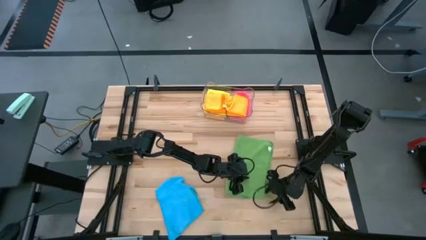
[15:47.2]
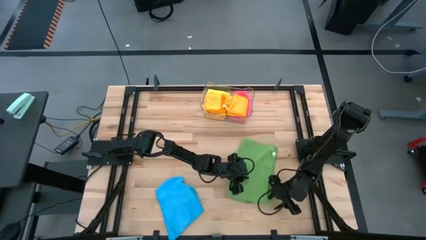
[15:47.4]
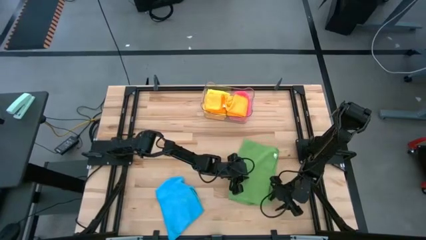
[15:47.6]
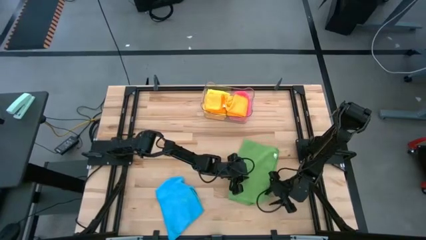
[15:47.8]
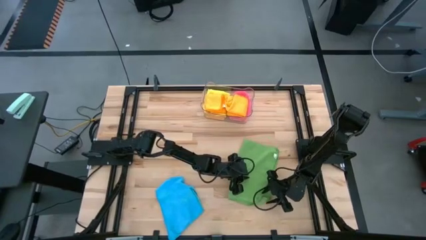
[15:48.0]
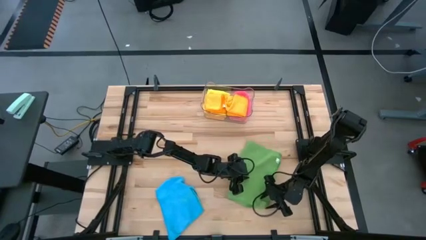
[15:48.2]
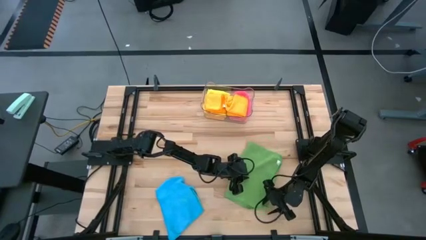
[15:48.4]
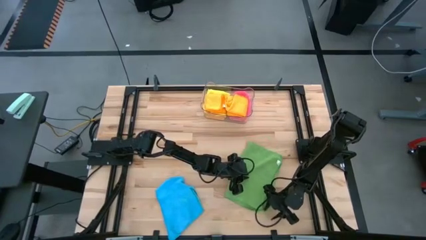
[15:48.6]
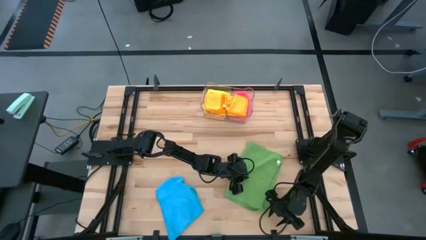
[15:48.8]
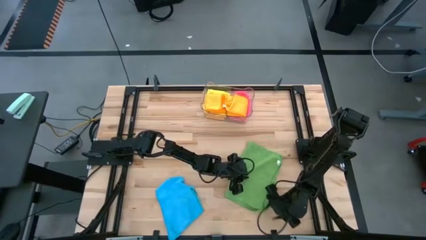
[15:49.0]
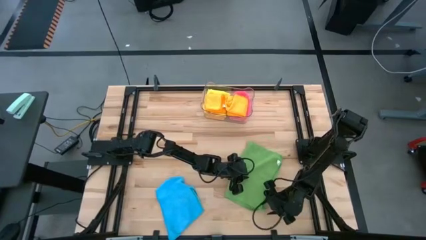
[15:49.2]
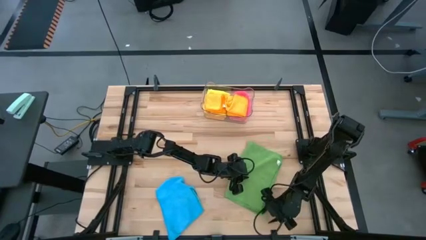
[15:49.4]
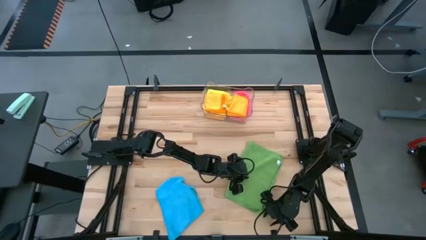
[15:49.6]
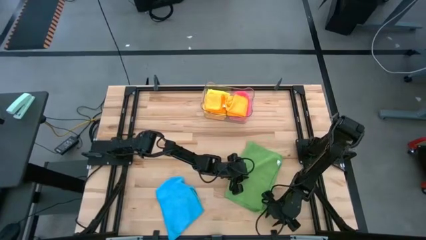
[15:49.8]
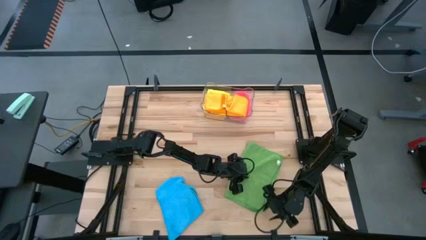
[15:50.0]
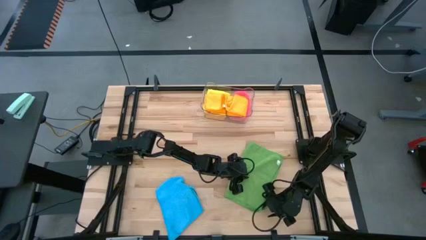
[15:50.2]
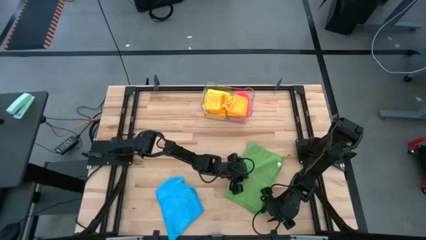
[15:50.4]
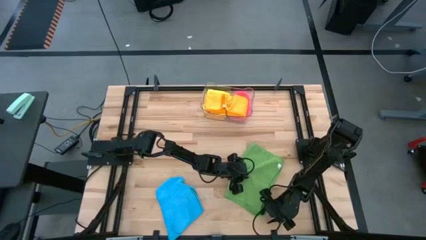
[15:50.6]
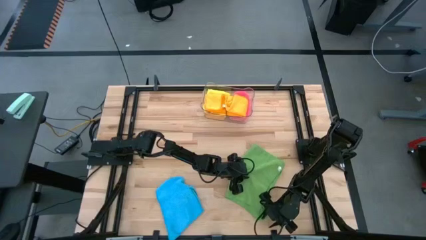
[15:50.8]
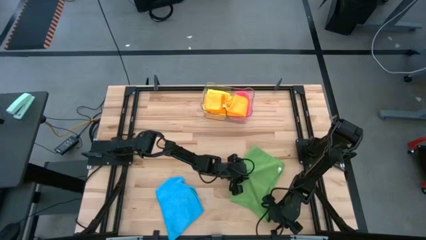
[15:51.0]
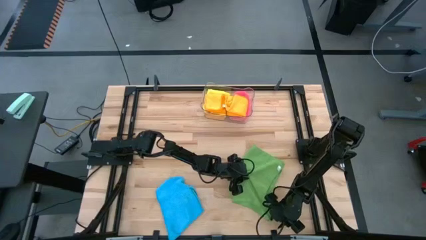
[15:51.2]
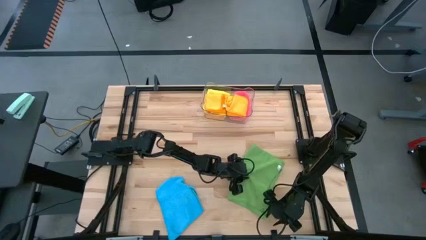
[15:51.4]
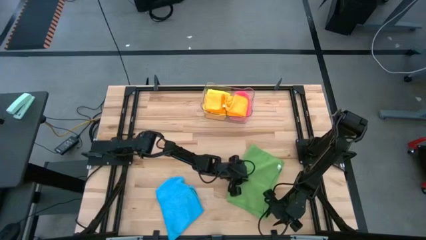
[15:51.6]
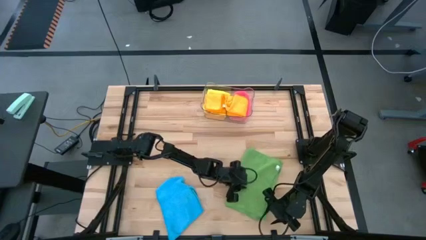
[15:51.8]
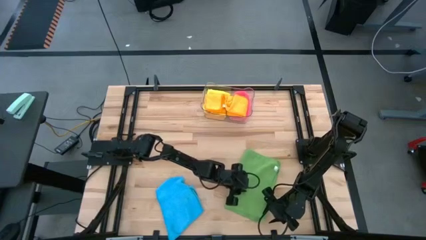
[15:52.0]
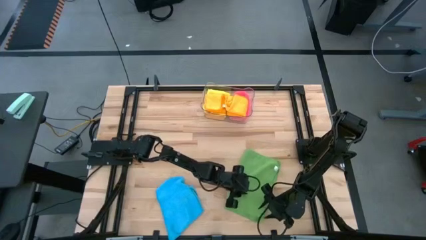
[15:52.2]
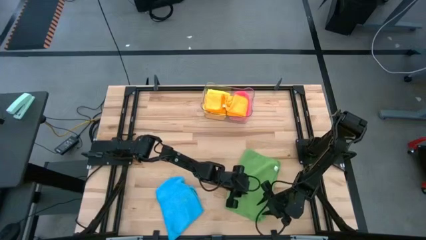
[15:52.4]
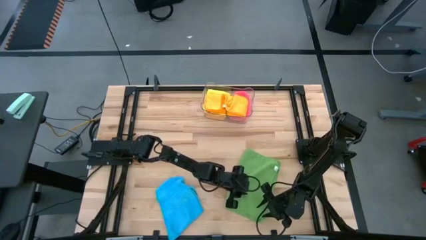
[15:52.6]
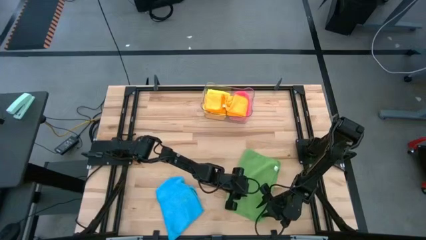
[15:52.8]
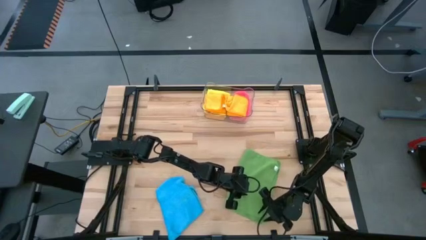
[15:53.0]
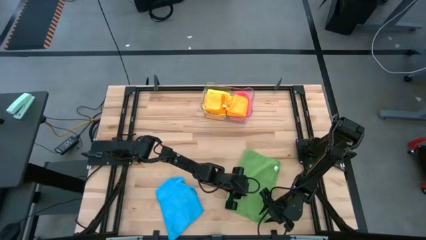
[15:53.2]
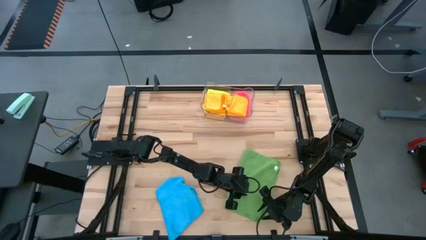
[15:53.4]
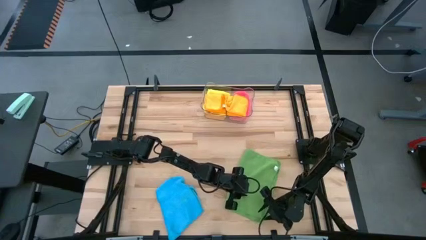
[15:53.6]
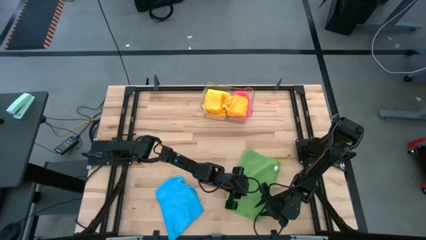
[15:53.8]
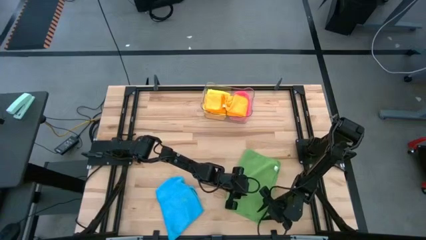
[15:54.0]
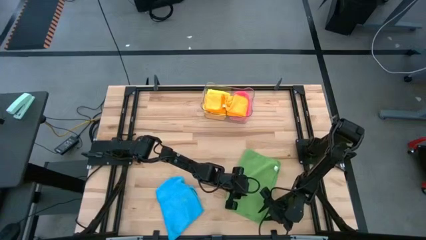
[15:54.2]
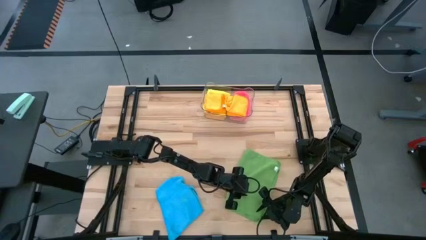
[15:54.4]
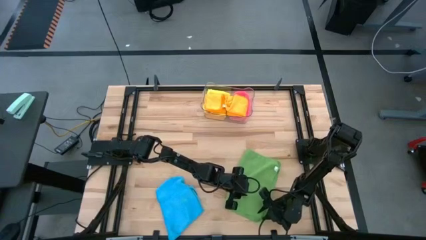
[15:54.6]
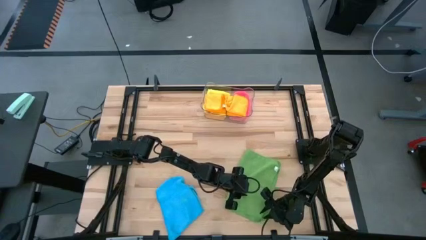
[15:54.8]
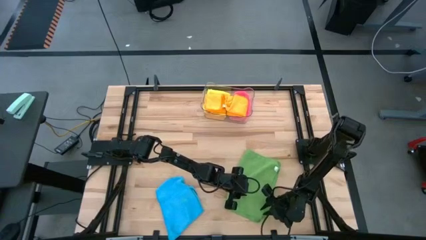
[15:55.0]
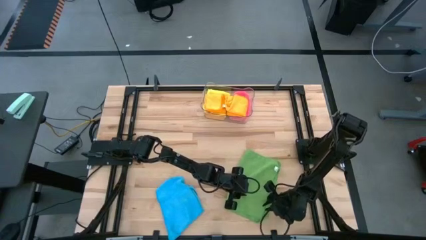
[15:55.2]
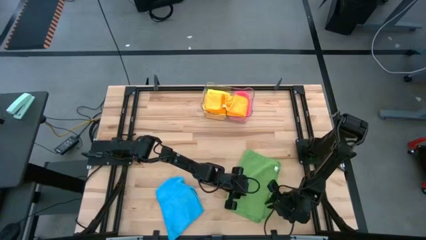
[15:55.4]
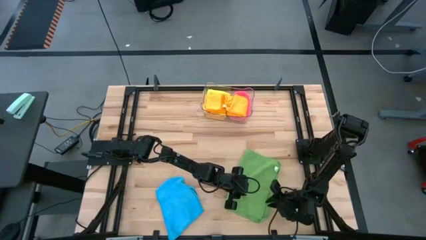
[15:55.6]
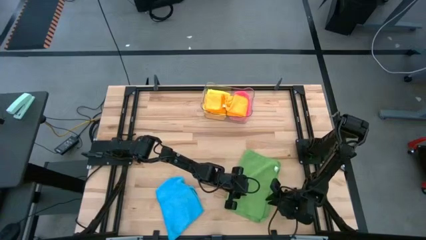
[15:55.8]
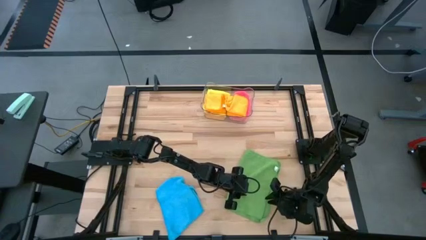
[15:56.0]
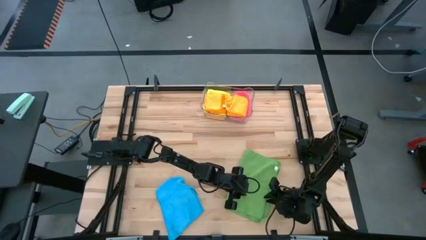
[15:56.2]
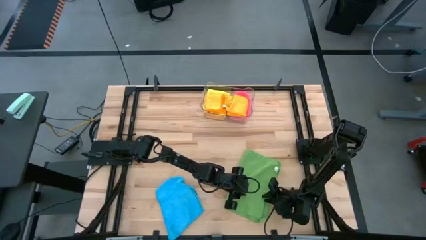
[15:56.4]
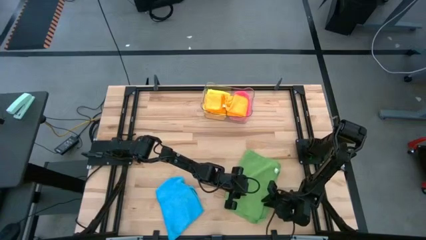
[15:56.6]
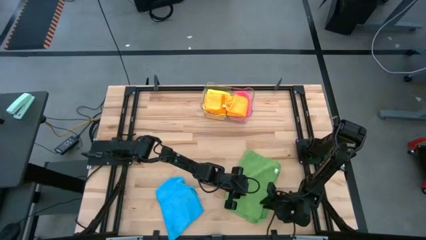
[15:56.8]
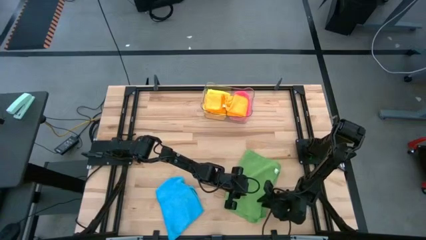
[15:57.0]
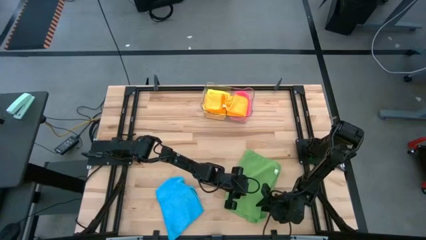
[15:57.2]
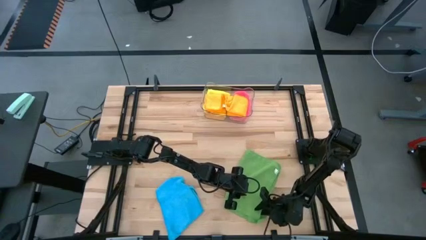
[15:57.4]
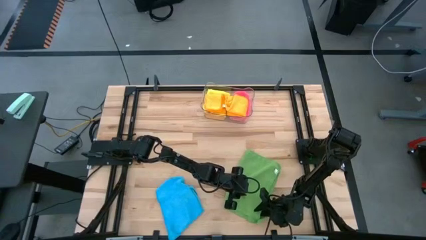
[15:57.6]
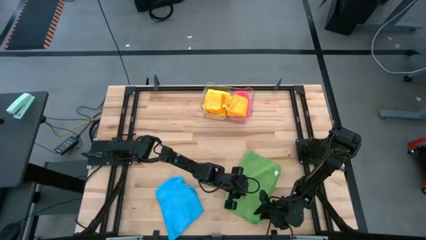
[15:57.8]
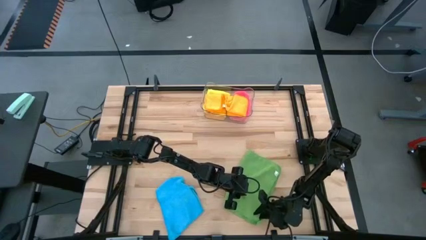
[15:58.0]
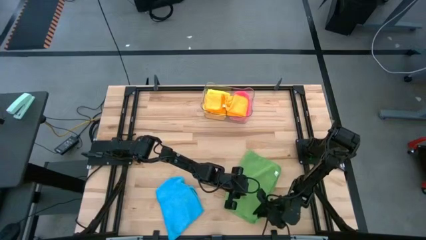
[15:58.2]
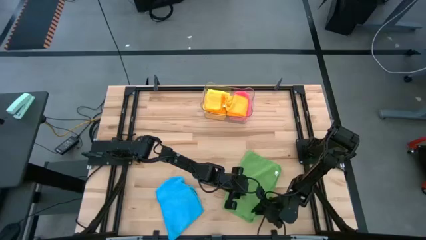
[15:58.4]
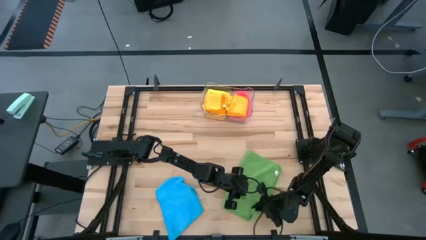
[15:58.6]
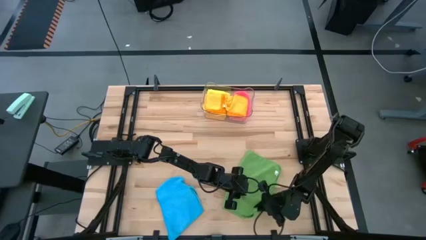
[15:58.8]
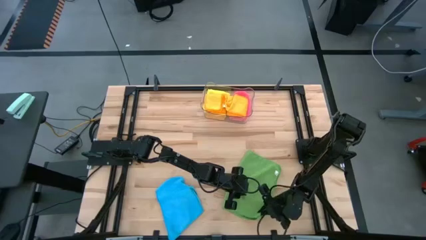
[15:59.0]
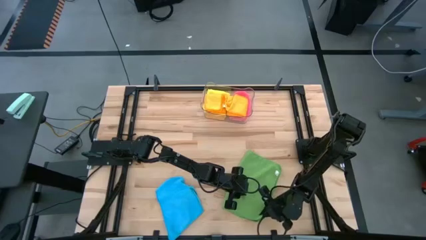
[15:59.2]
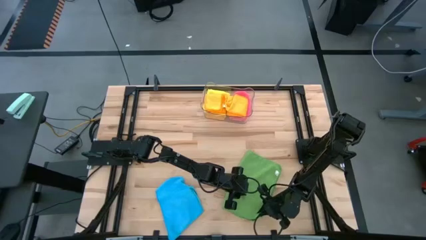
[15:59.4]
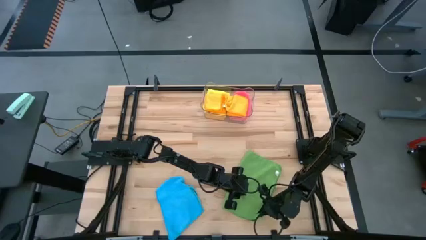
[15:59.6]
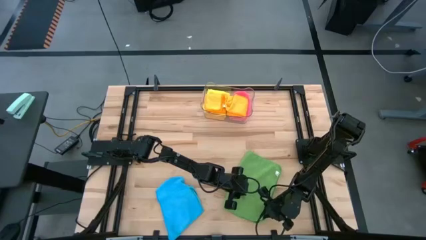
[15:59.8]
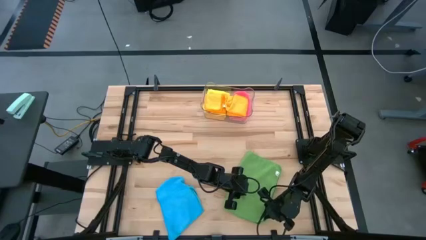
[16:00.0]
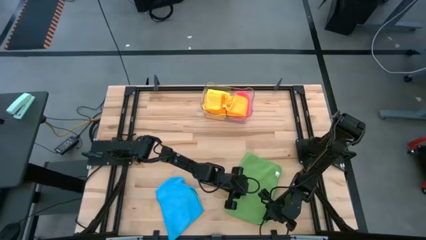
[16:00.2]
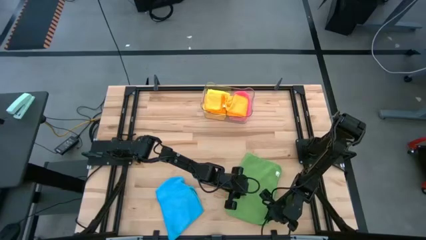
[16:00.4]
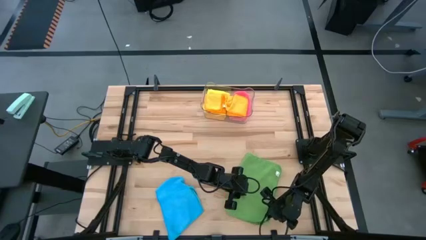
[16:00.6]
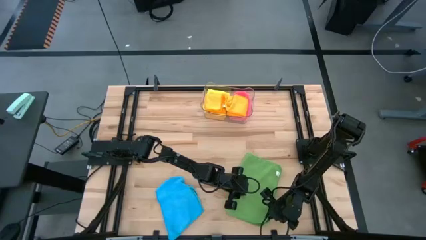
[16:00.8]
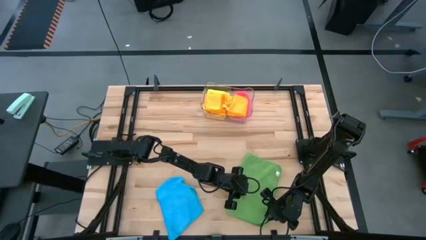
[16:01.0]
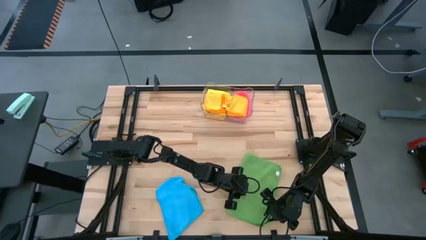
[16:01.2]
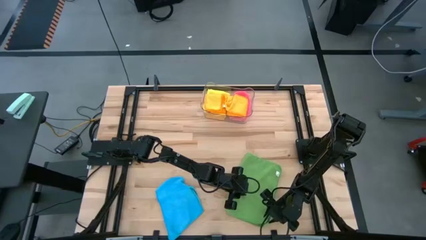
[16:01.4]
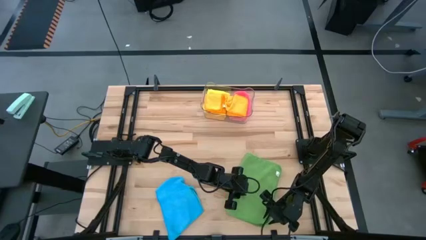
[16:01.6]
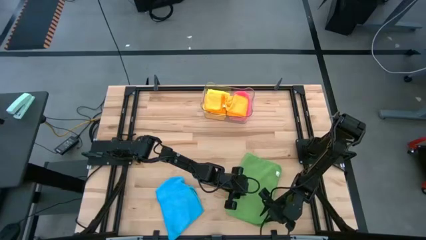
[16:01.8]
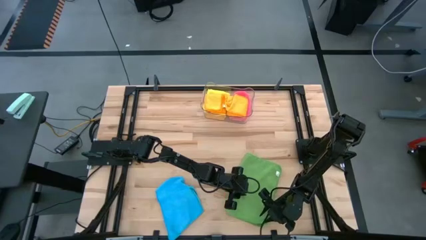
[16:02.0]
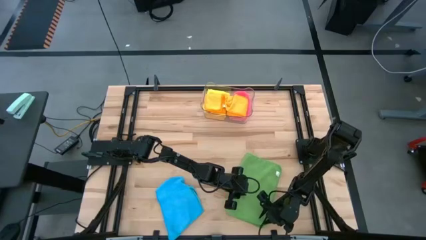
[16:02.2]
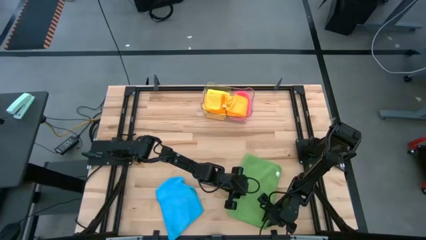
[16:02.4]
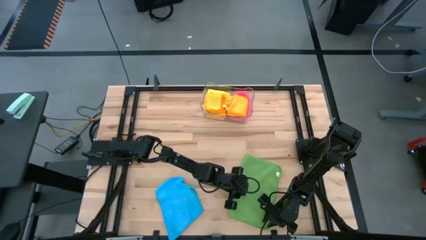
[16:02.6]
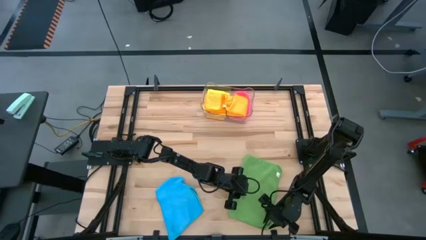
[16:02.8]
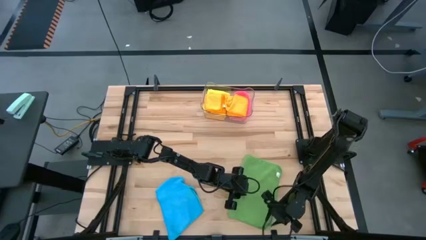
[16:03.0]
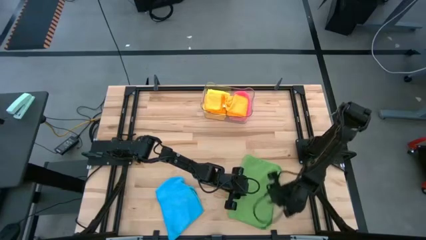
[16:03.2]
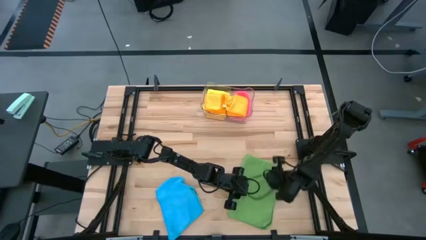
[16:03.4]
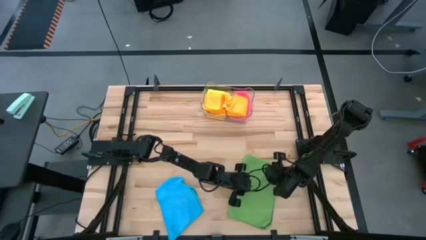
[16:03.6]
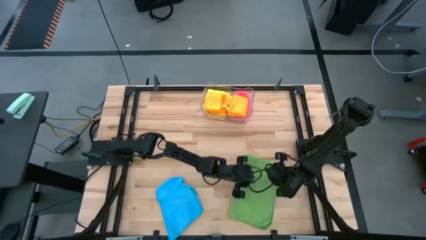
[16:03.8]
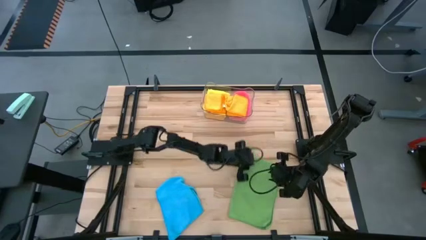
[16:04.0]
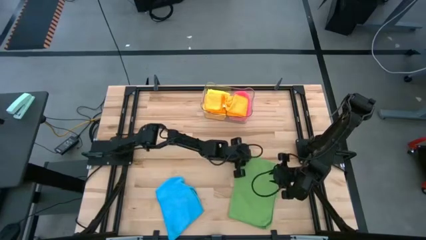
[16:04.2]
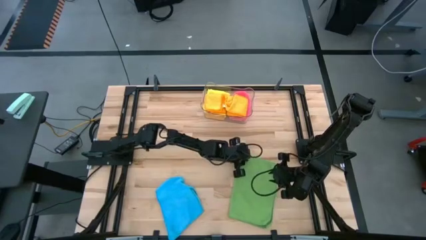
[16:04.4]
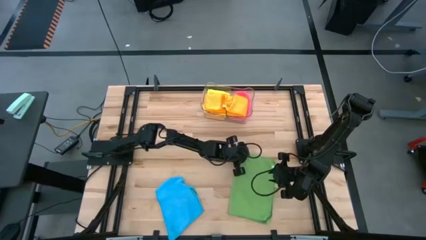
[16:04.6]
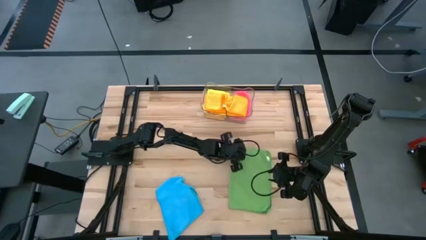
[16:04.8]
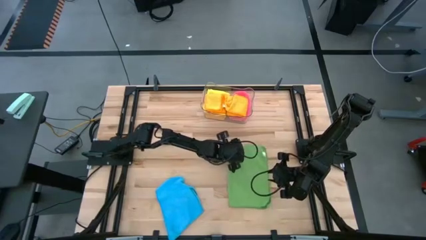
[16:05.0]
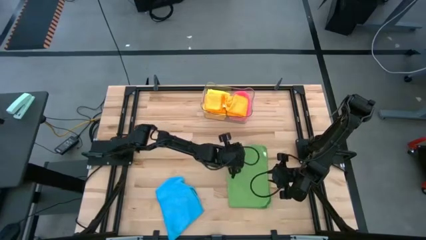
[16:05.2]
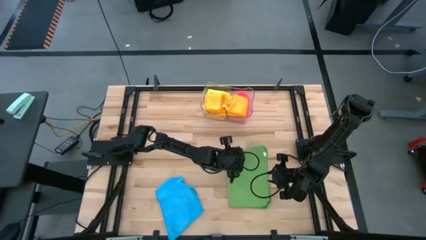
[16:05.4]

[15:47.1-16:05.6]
Task: Fold microfiber towels
Fold the green microfiber cloth
